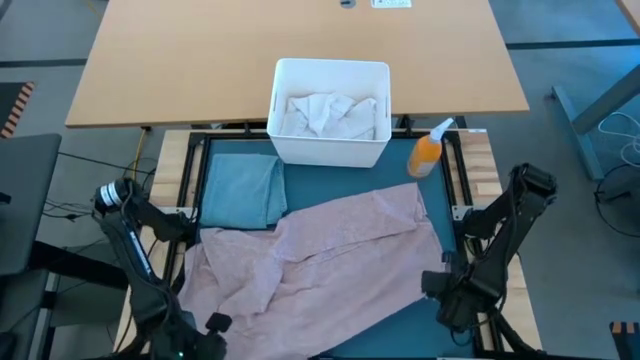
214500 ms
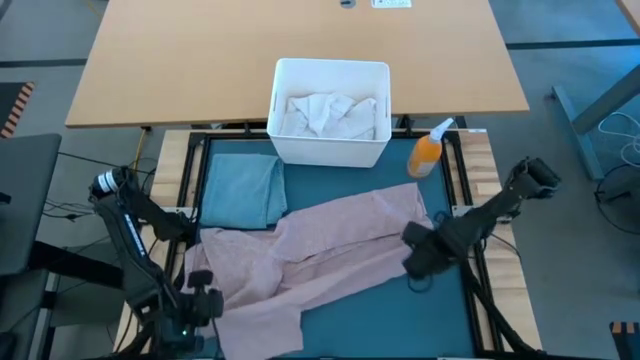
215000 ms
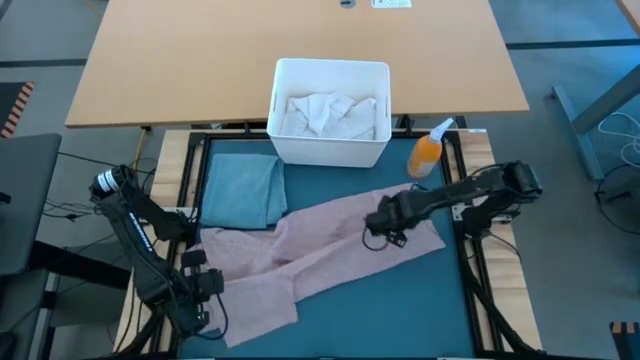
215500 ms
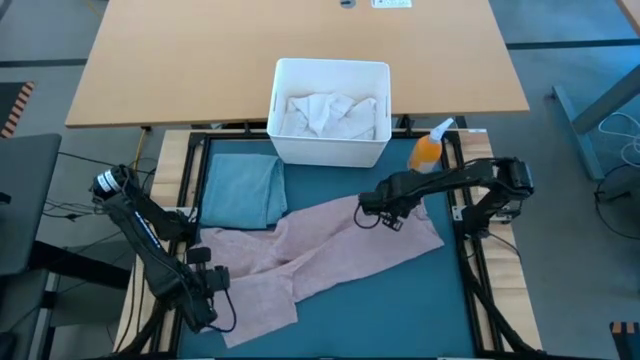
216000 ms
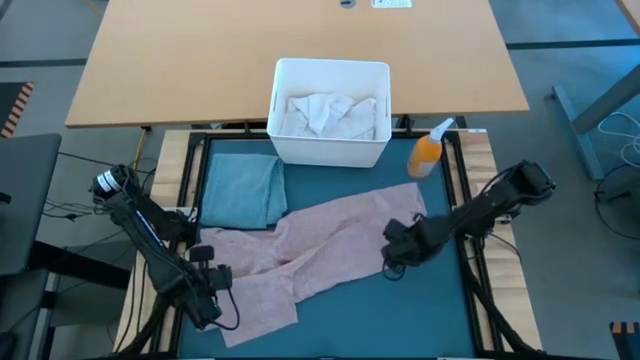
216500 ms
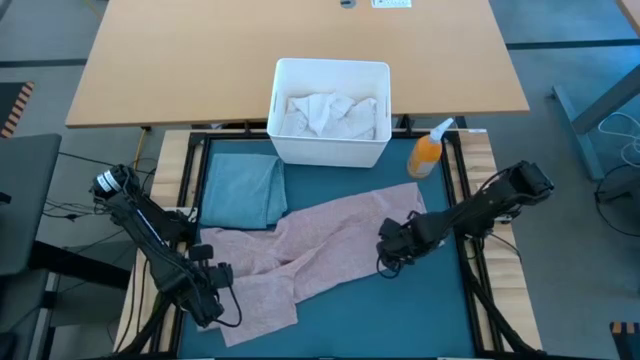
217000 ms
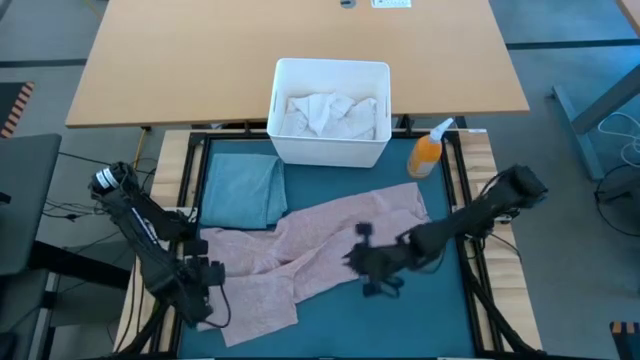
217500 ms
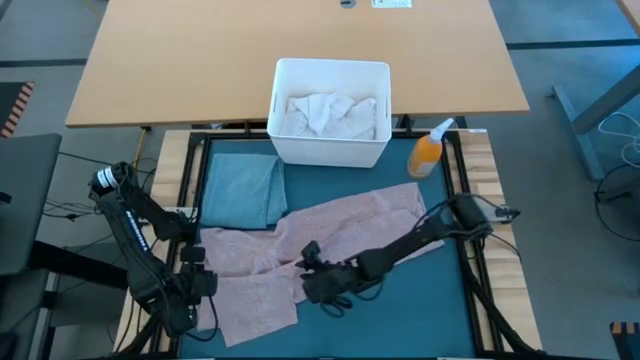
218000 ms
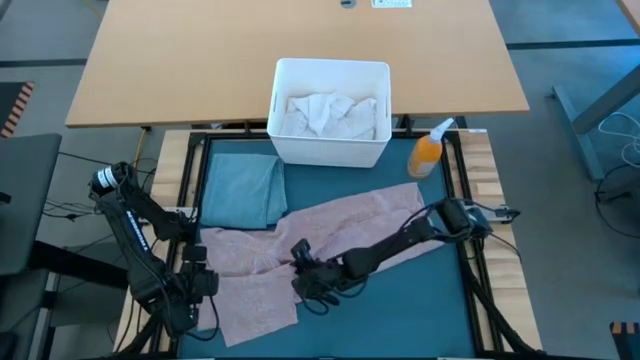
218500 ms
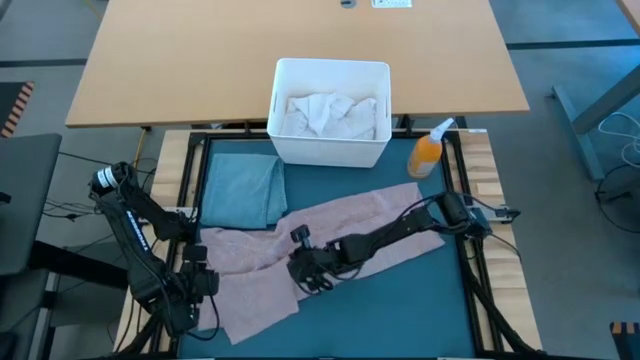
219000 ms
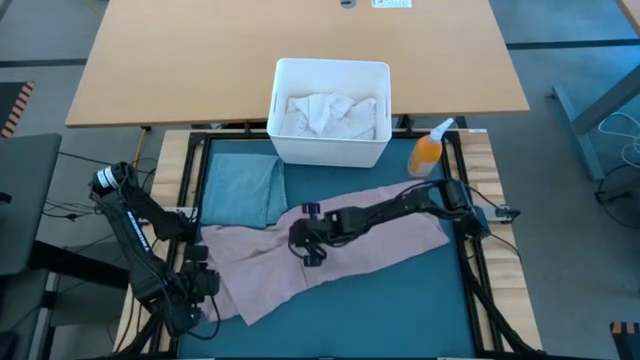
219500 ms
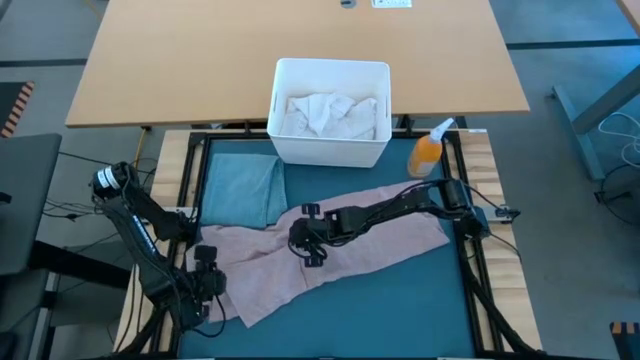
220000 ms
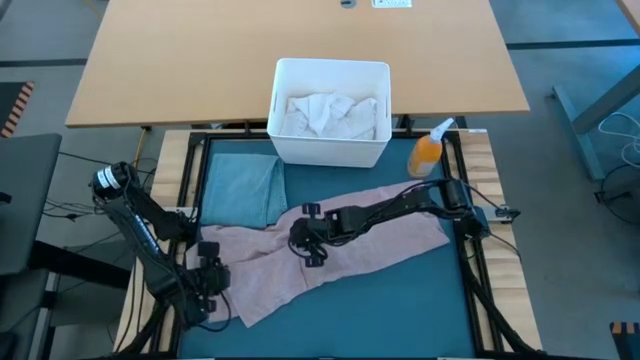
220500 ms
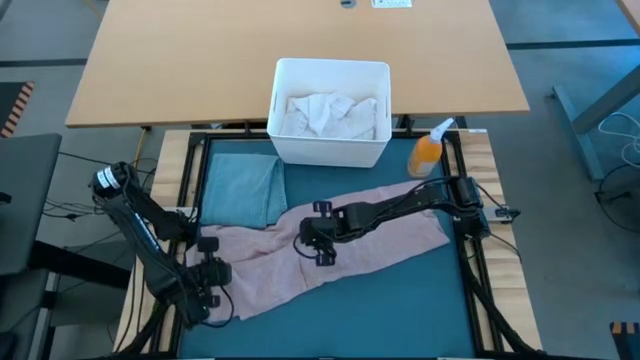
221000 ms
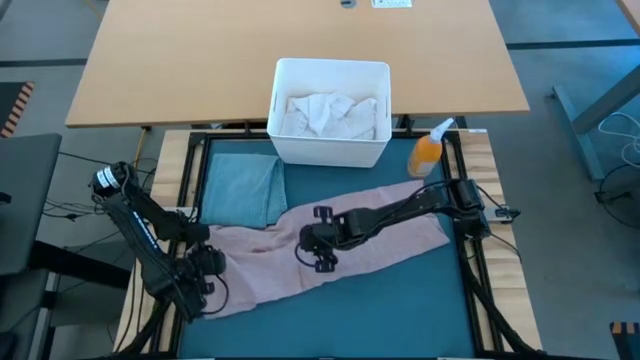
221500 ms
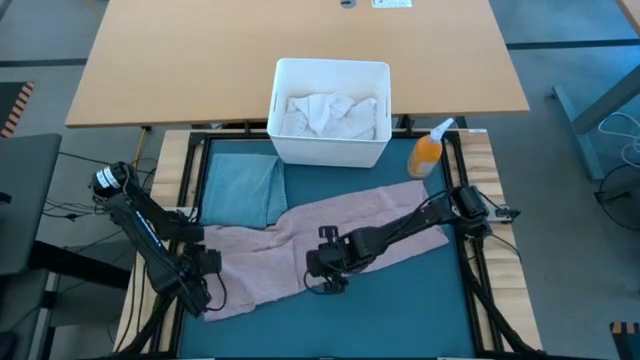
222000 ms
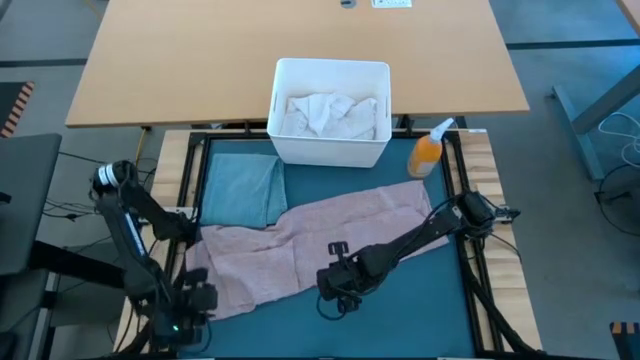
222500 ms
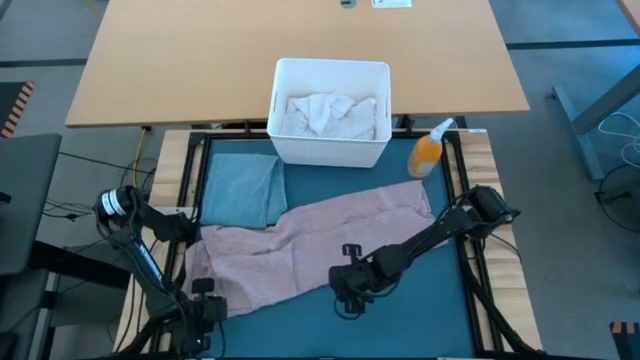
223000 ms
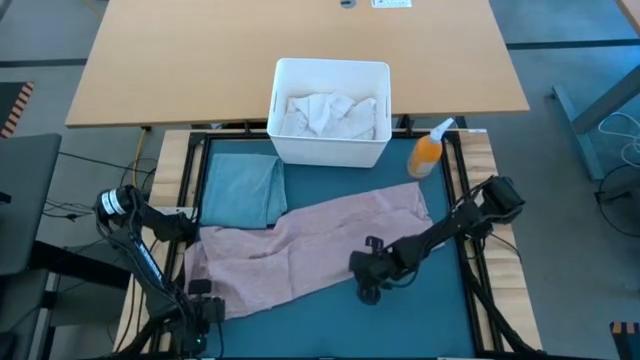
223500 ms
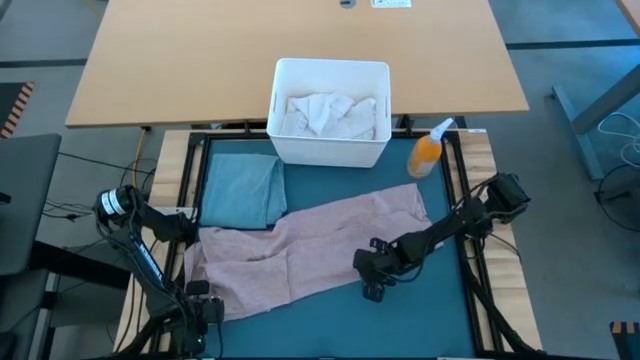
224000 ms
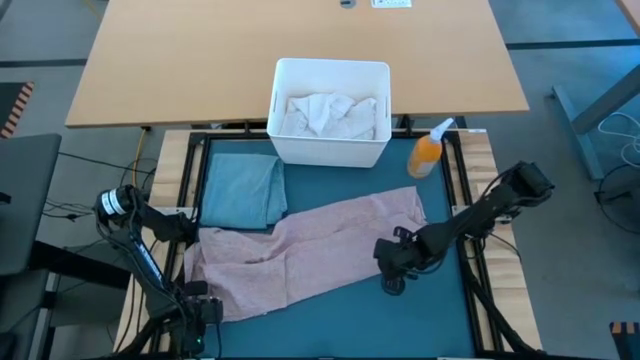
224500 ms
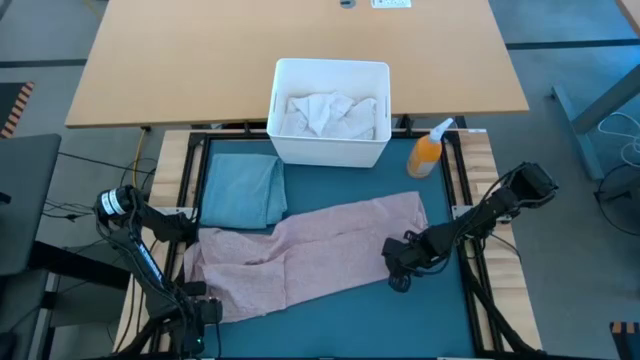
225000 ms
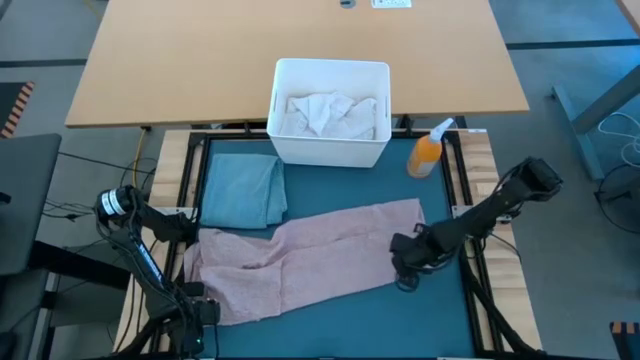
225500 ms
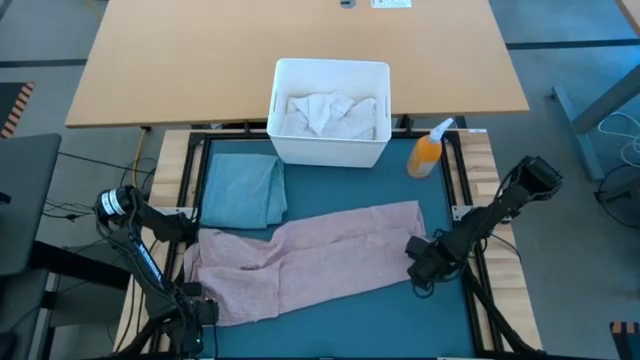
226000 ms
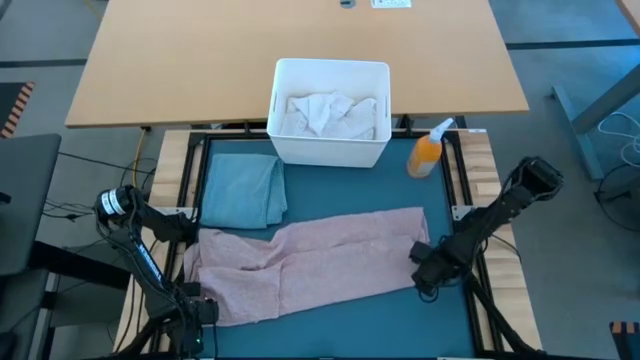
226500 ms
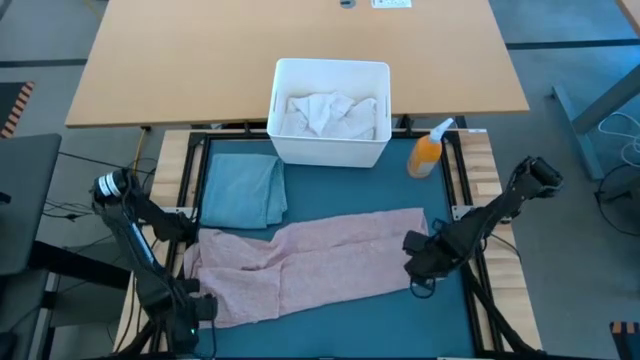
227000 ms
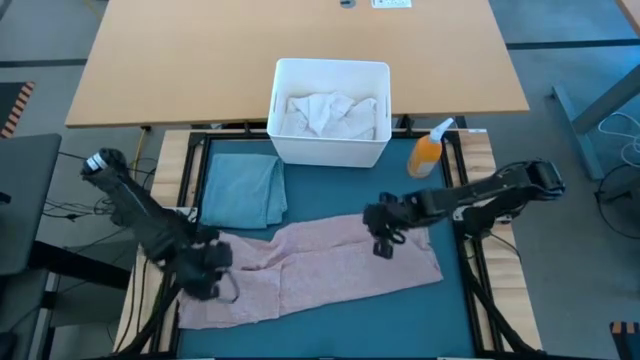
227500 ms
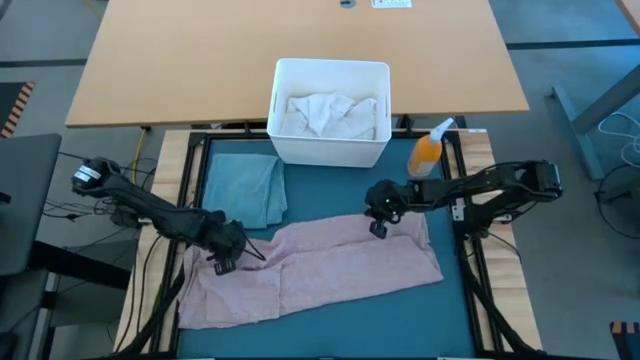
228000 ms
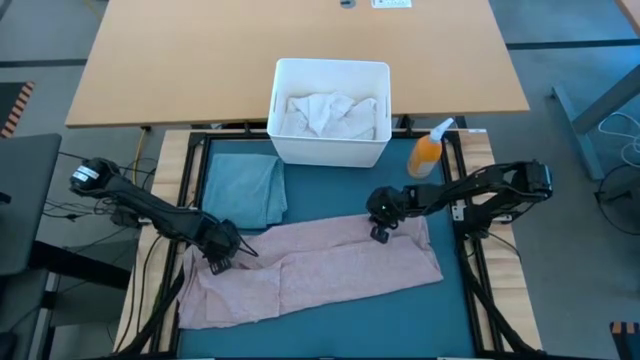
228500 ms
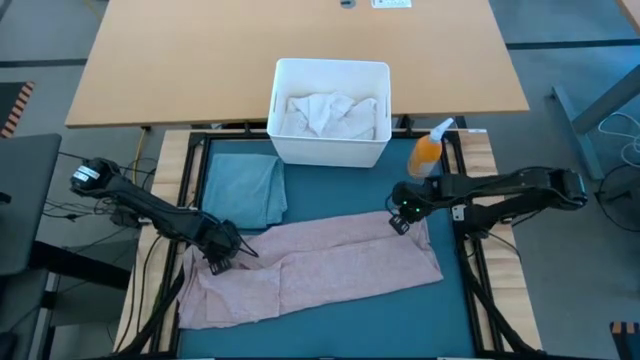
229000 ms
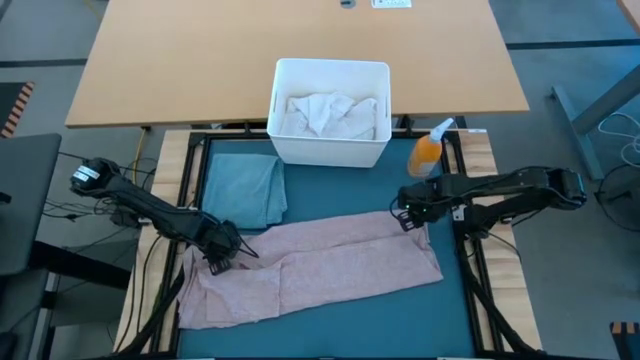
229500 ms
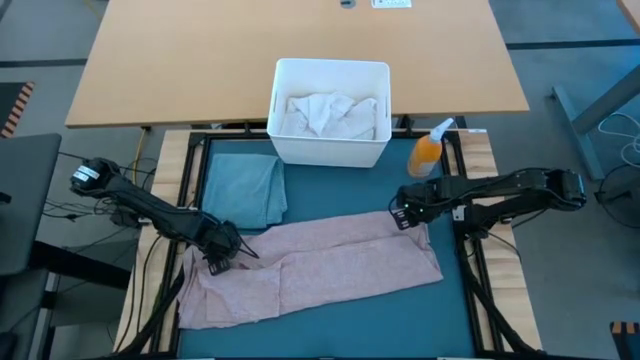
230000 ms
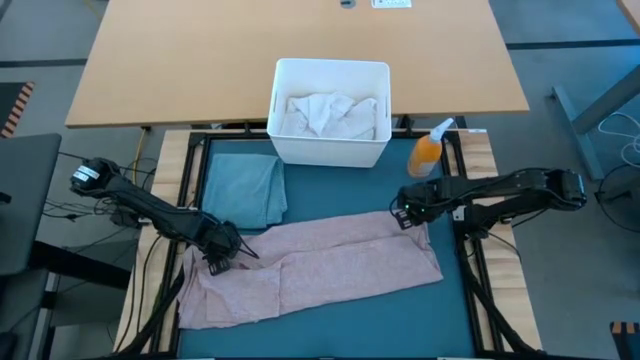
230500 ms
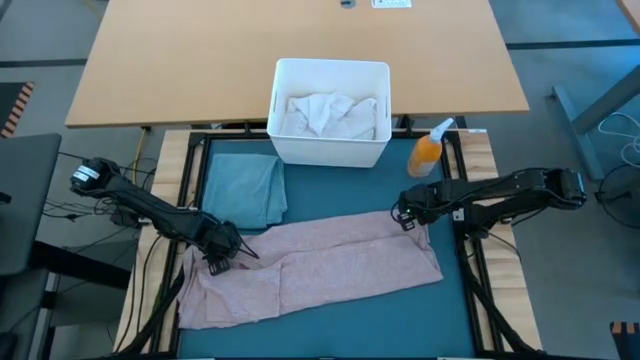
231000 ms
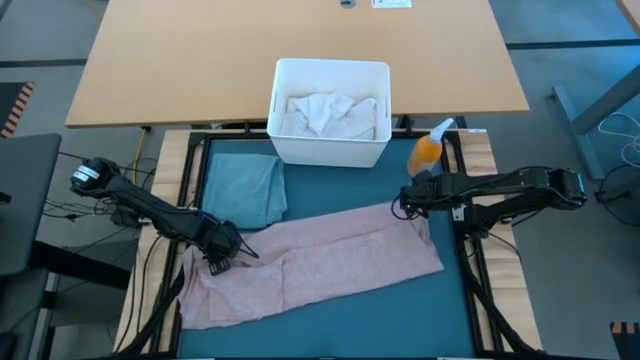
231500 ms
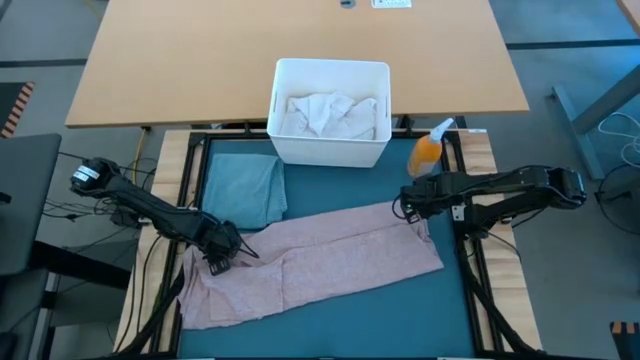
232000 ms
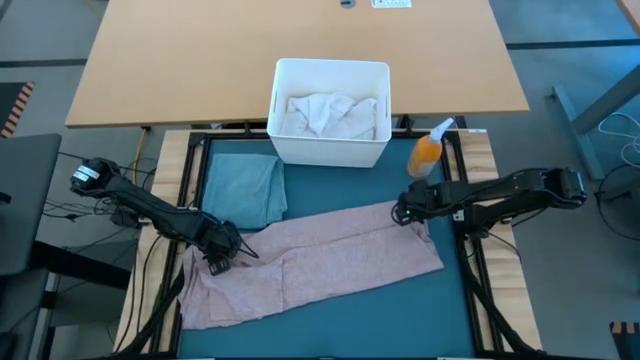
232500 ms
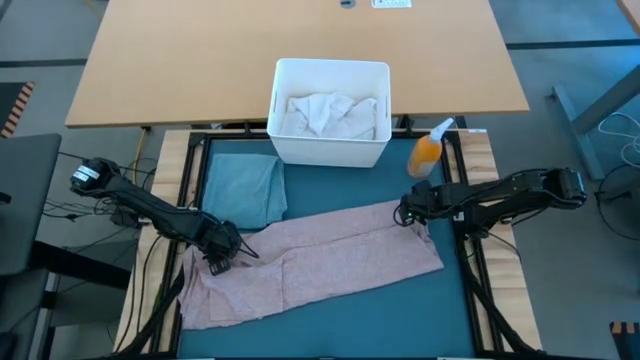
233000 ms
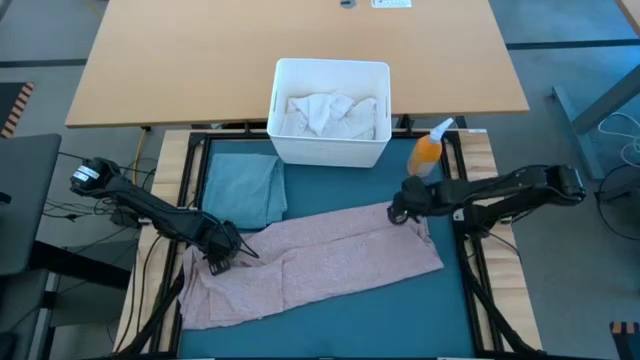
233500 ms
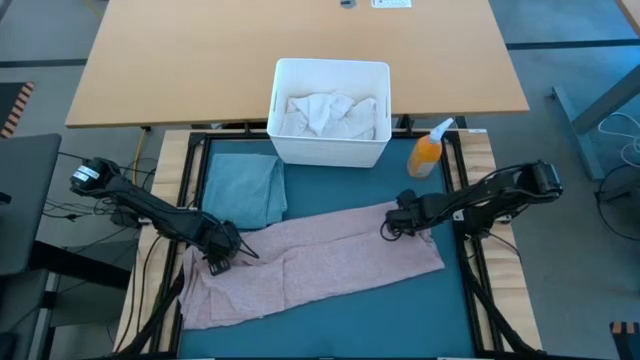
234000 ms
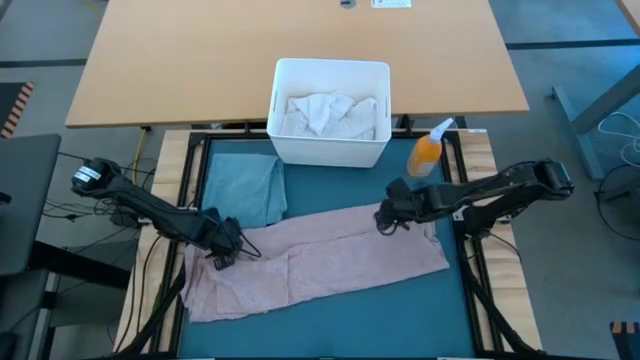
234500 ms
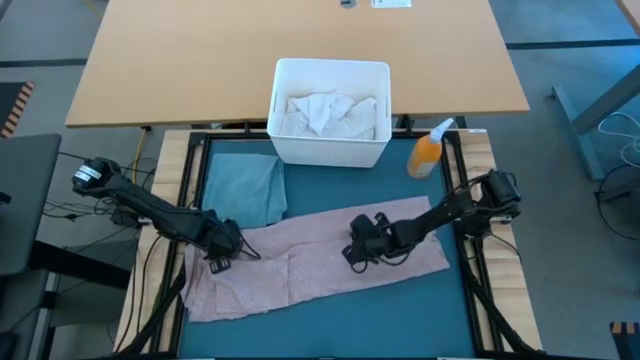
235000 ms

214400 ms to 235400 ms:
Task: Fold Laundry from Bin
Fold the pink shirt
